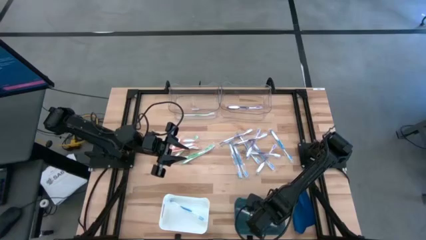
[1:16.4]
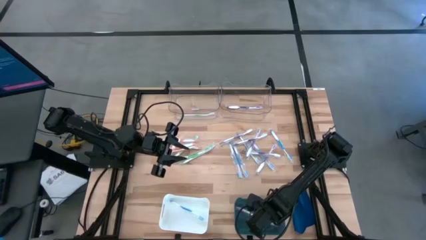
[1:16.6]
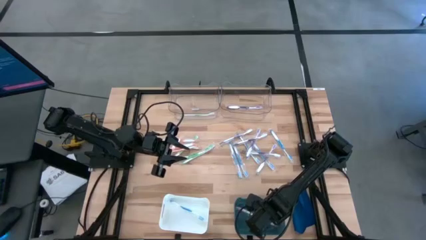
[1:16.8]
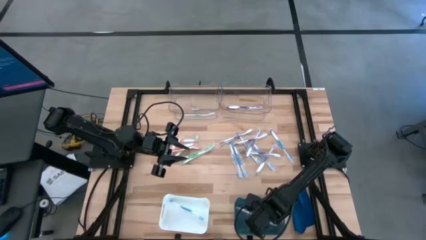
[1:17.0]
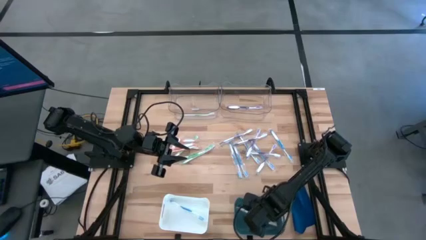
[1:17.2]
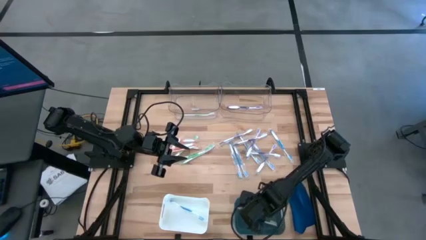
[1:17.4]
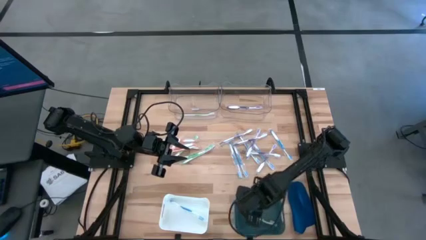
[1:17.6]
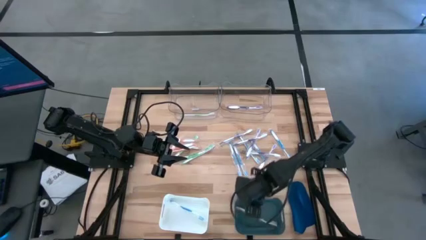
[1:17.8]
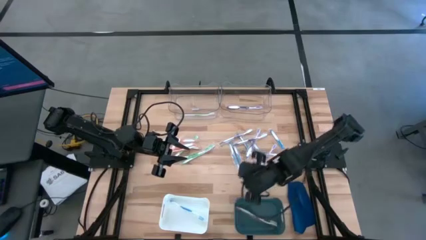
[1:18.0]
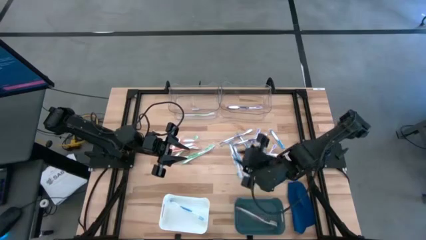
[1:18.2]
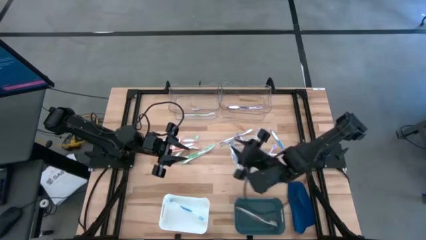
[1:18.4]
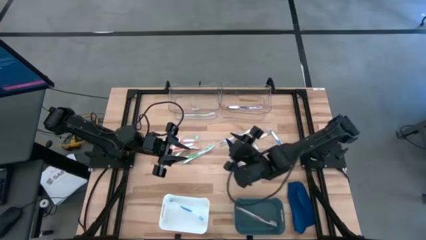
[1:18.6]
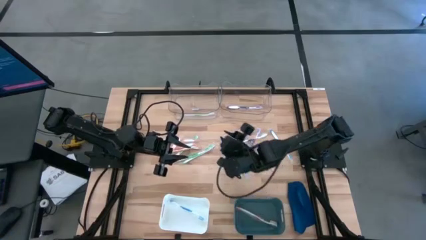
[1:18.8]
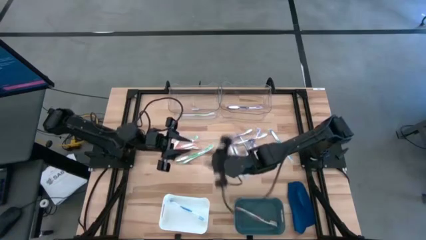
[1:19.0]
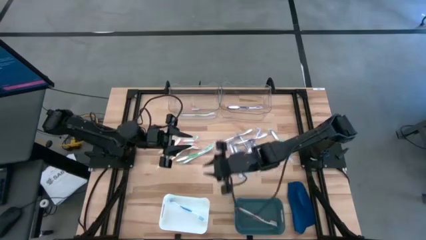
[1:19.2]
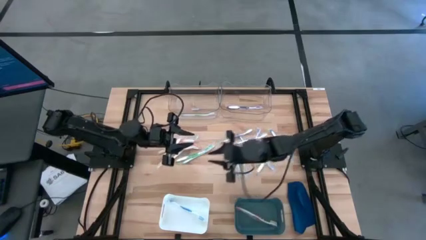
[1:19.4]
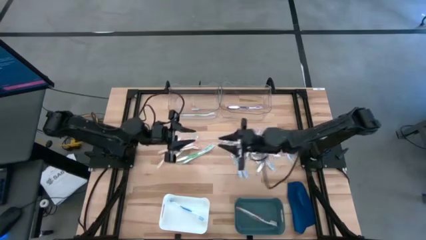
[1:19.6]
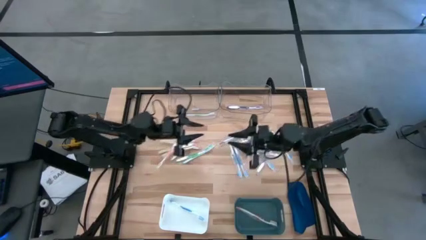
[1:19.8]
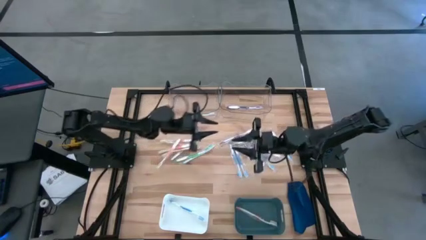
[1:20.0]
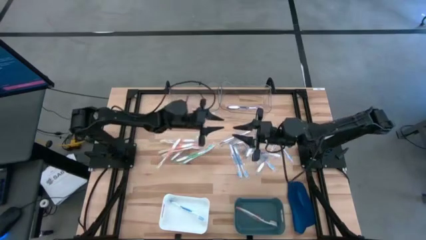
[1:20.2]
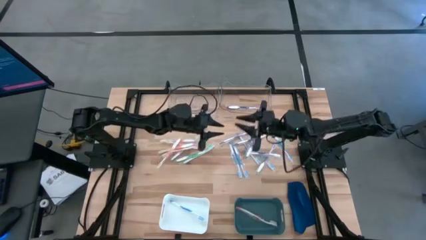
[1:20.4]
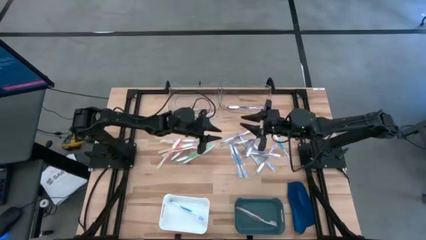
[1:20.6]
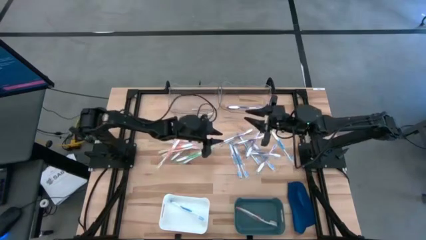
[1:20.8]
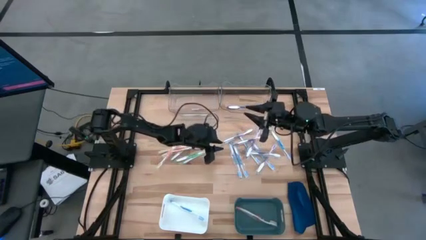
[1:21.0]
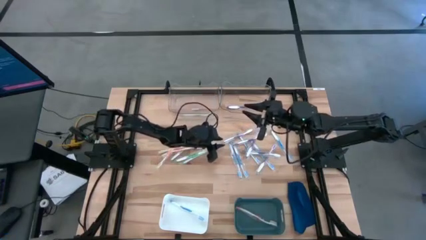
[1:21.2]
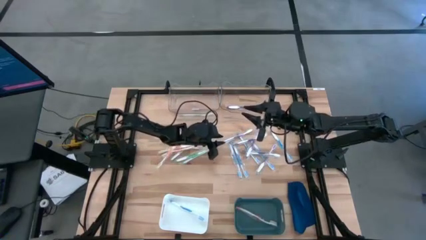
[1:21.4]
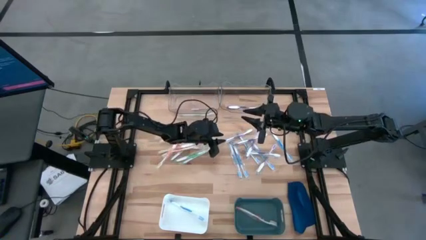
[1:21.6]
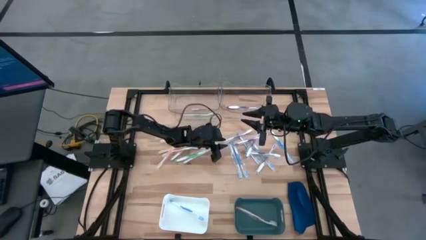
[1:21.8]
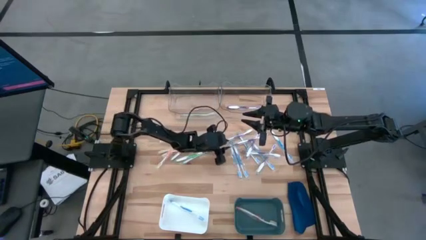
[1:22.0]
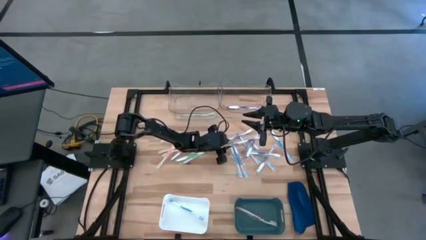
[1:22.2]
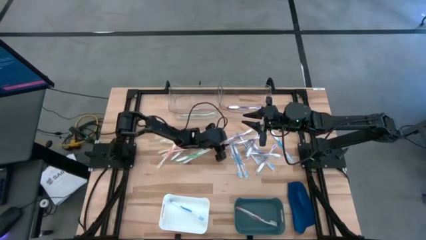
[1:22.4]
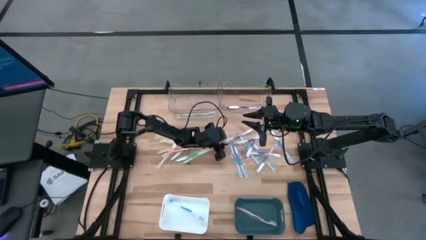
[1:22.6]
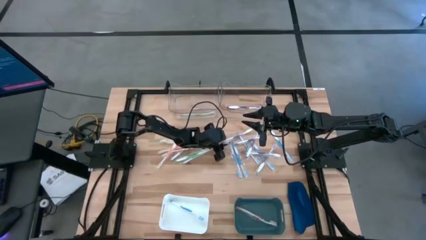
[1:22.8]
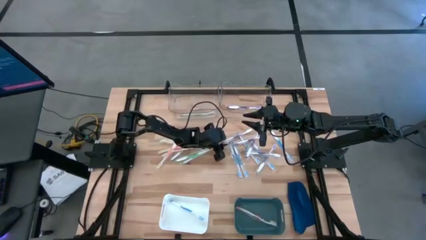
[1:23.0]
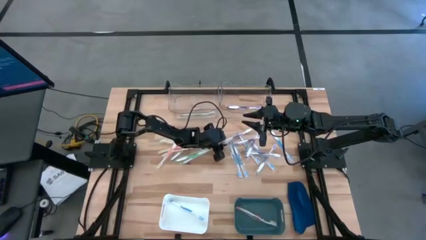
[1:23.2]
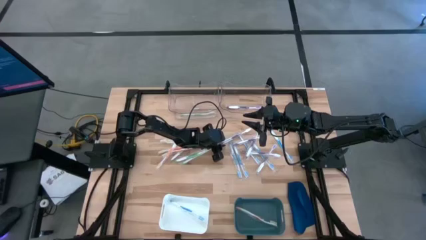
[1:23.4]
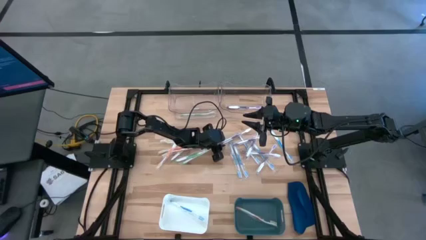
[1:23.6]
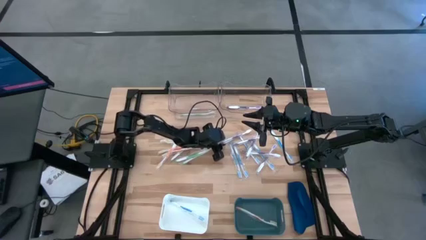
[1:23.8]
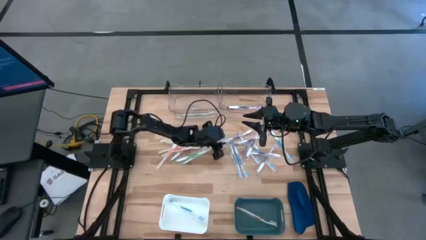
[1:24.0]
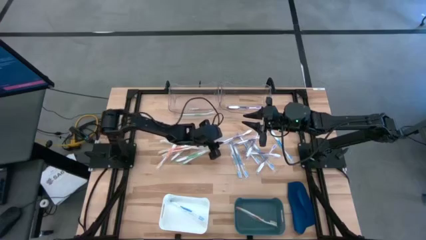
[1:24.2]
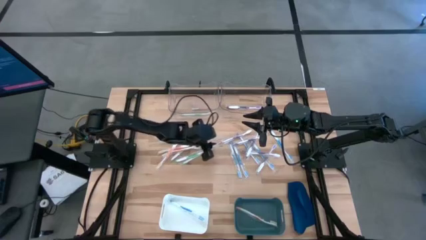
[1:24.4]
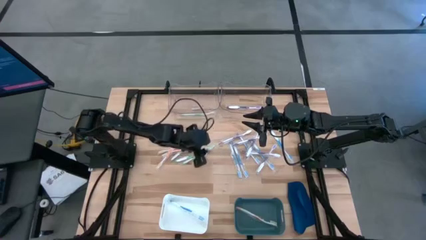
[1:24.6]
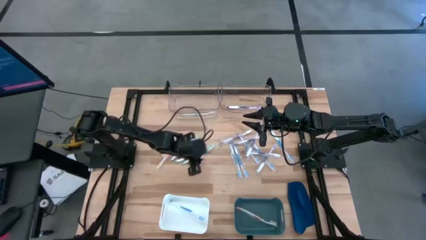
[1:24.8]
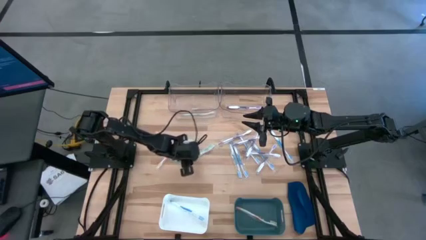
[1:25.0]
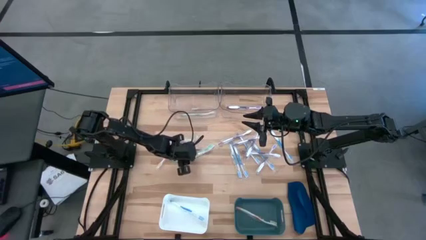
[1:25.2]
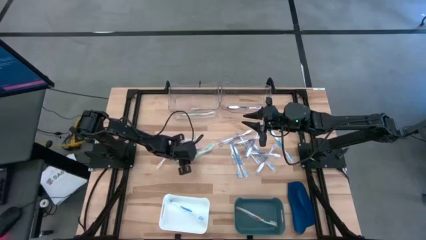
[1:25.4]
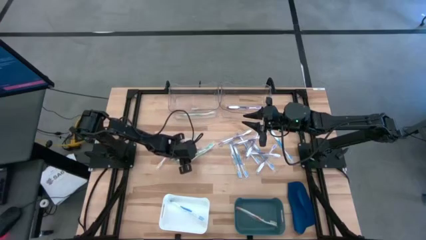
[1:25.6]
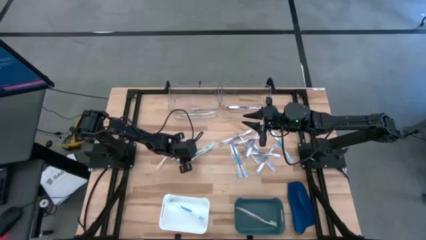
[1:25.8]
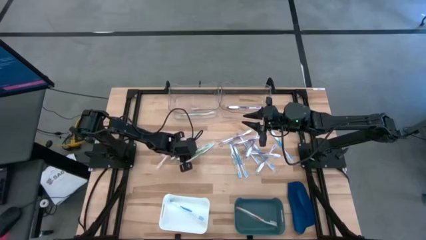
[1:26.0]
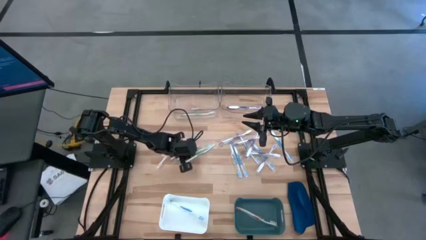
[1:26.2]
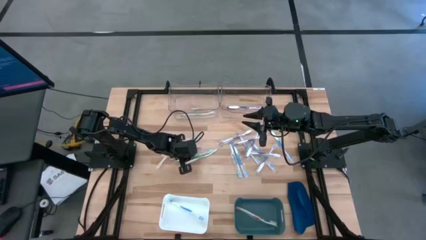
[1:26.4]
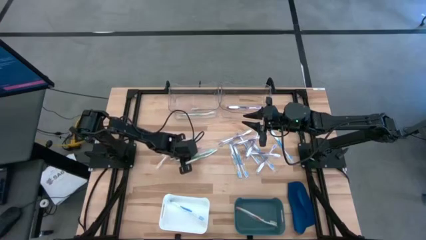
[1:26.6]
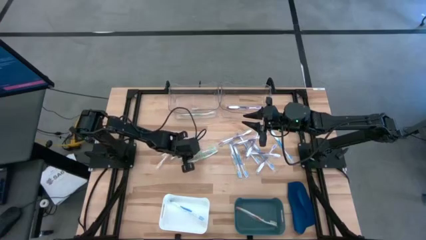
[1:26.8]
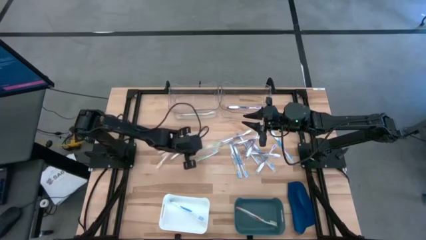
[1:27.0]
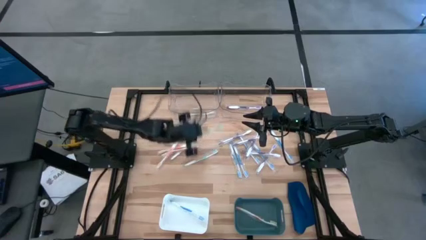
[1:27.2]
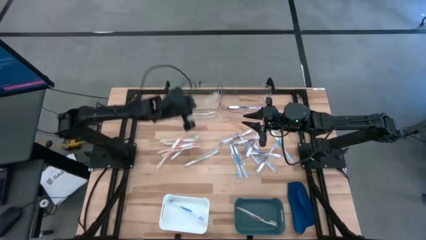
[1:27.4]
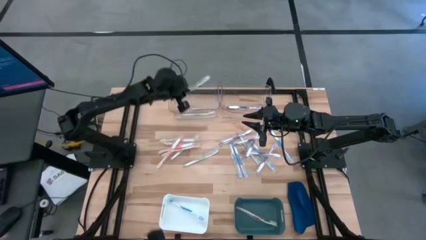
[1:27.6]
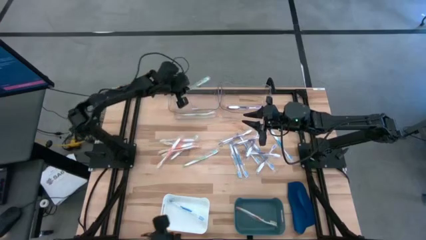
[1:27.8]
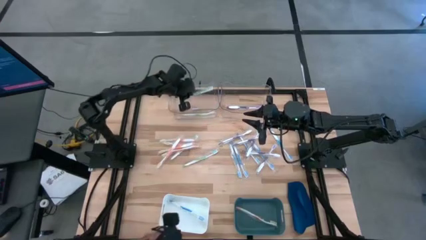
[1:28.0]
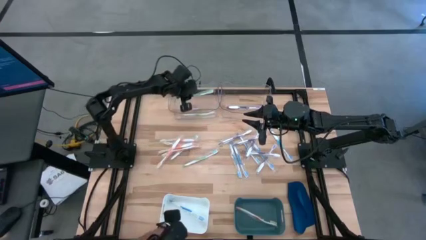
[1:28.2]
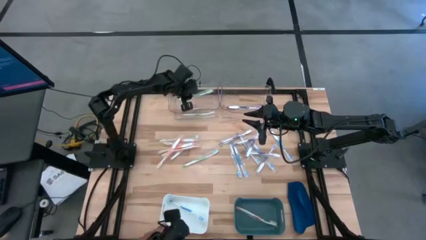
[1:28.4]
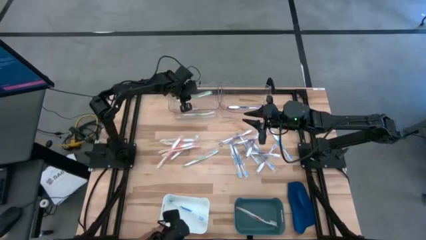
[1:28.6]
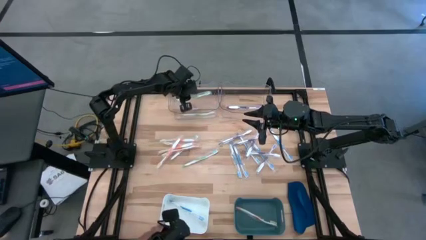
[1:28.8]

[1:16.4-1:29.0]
Task: Pick & Place Toothbrushes
Put the green toothbrush into the left transparent bin

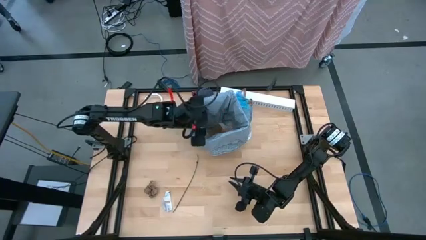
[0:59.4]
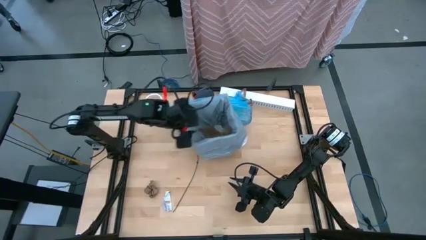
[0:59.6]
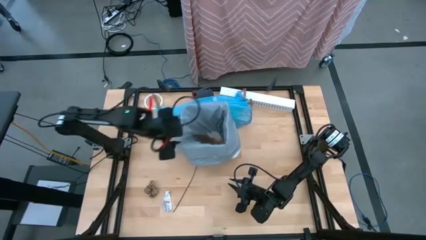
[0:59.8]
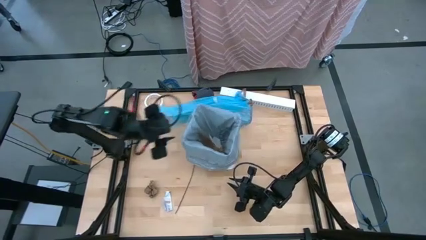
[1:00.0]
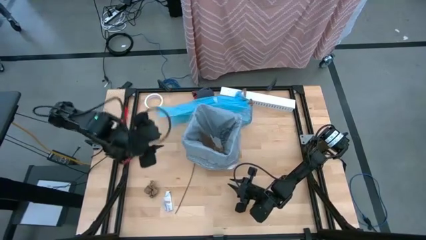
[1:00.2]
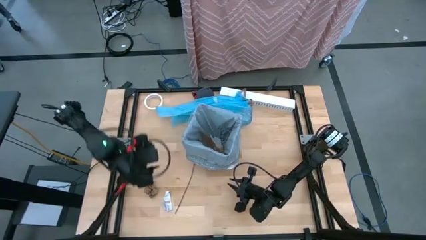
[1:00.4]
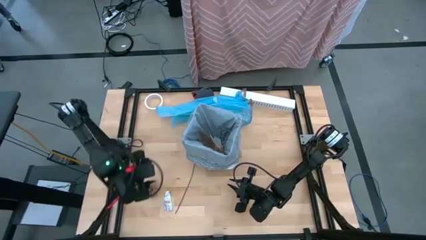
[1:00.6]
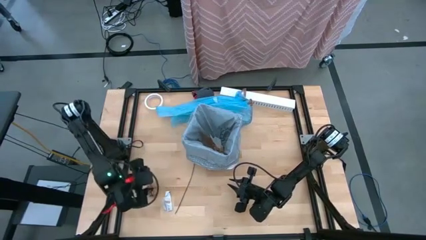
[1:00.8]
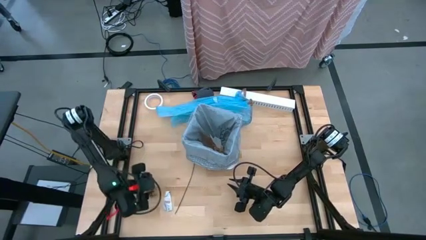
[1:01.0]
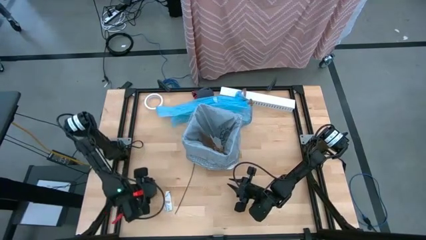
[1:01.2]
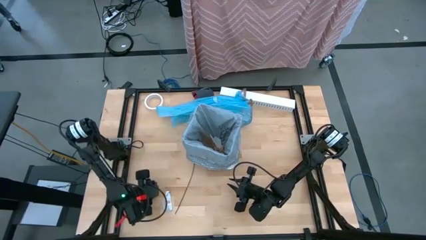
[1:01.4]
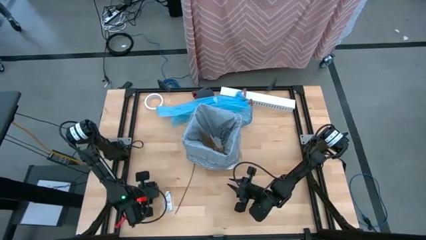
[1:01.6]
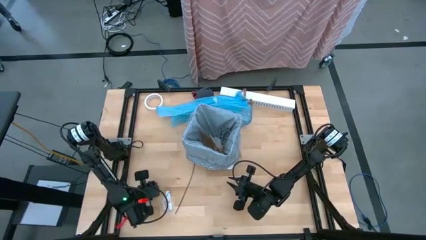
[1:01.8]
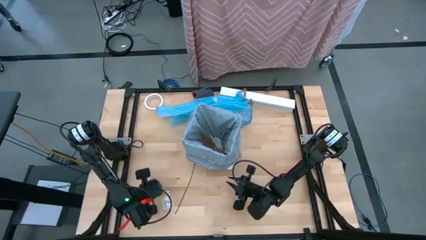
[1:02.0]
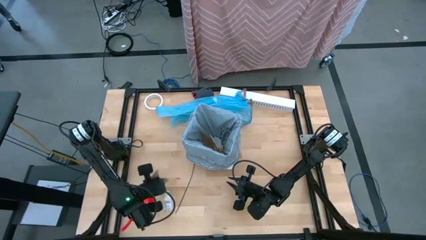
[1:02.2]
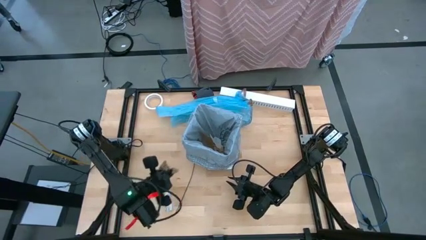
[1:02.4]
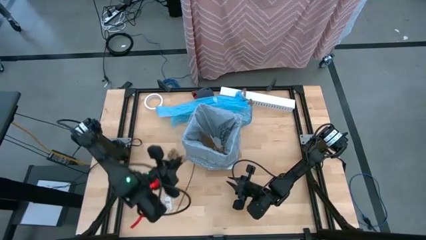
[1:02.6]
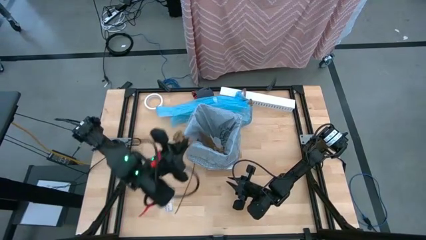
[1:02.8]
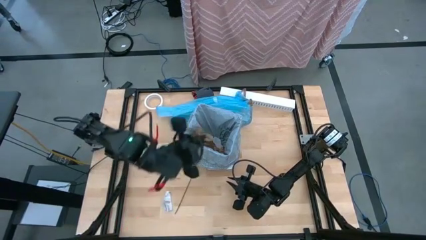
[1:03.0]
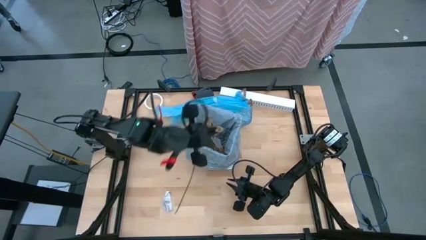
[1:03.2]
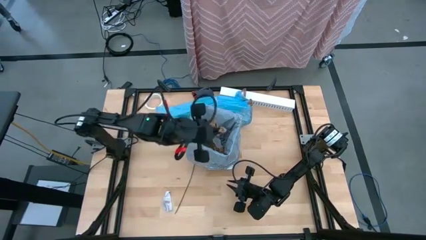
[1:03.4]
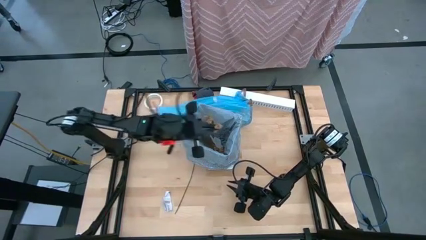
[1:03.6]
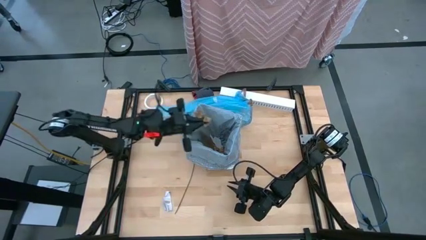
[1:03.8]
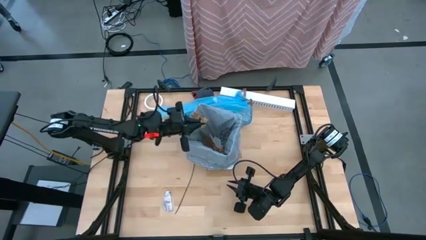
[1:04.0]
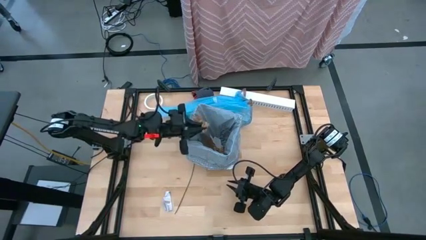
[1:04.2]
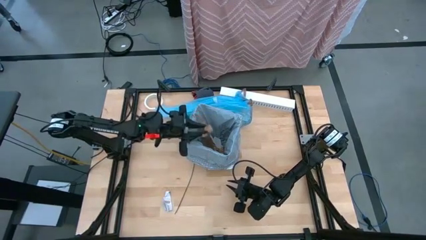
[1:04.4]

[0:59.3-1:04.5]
Task: place trash/remove bag and relplace
Put the brown napkin inside the black trash bin
